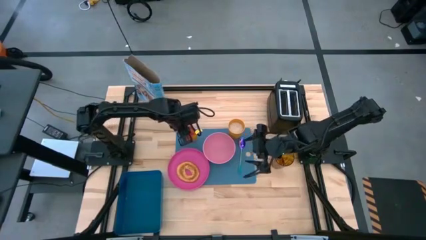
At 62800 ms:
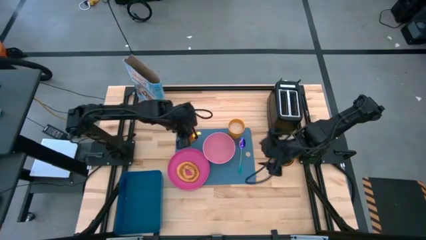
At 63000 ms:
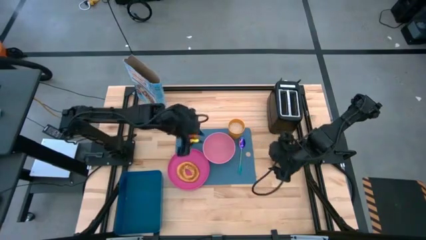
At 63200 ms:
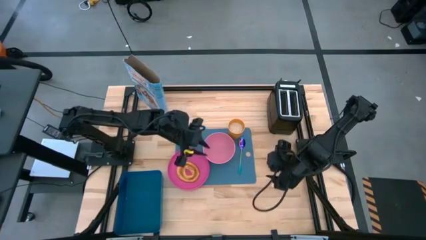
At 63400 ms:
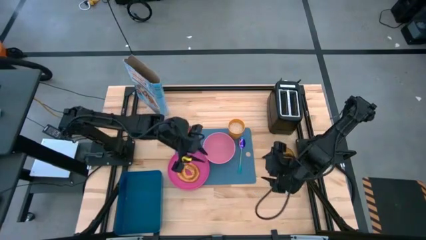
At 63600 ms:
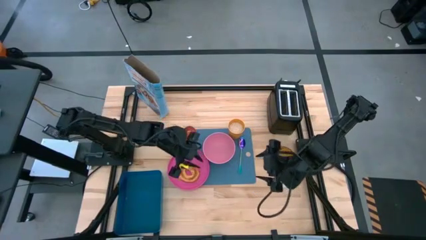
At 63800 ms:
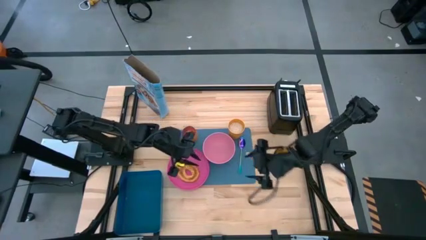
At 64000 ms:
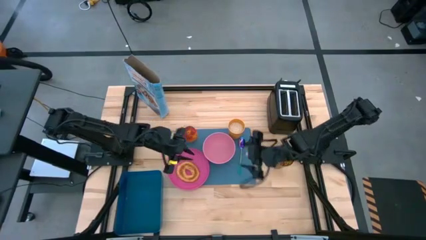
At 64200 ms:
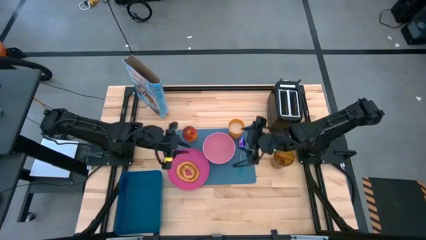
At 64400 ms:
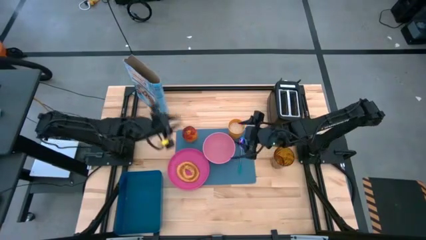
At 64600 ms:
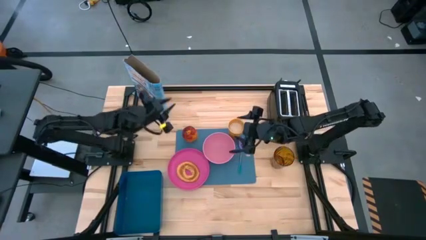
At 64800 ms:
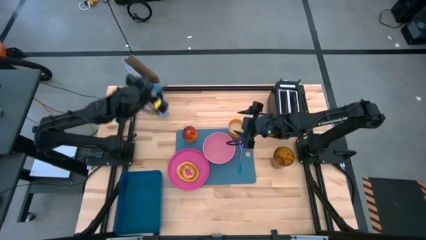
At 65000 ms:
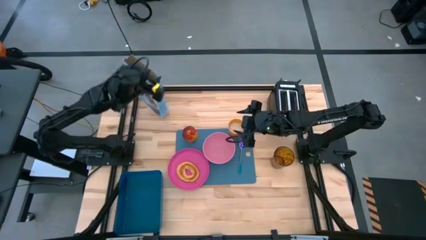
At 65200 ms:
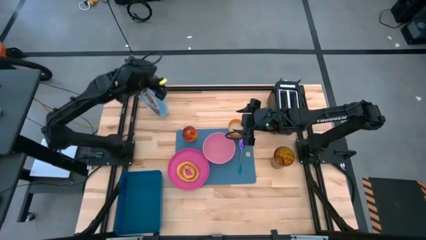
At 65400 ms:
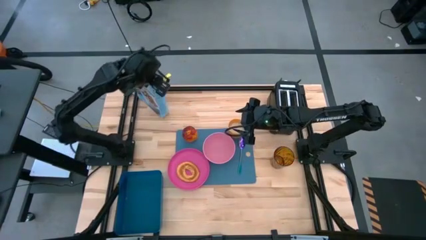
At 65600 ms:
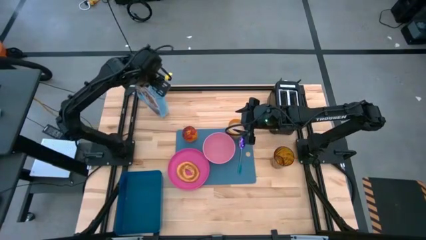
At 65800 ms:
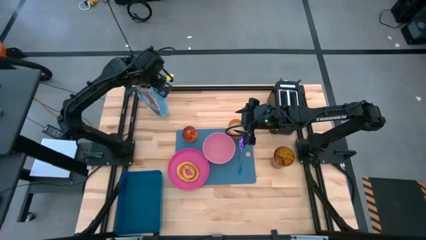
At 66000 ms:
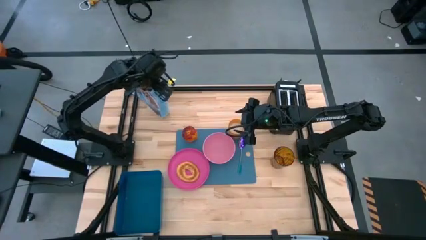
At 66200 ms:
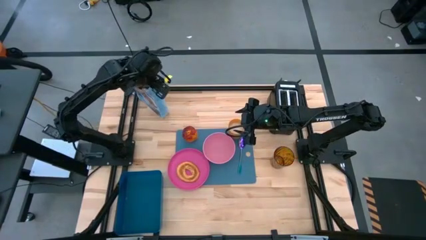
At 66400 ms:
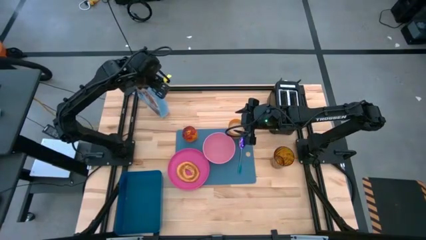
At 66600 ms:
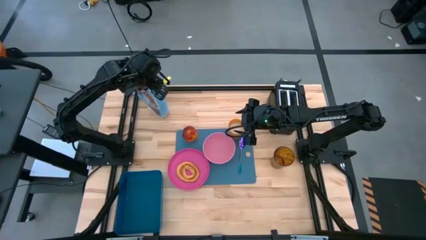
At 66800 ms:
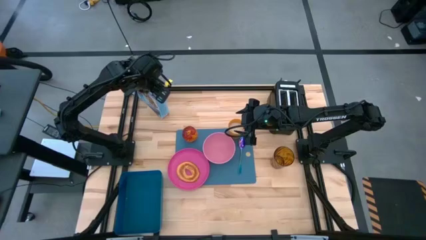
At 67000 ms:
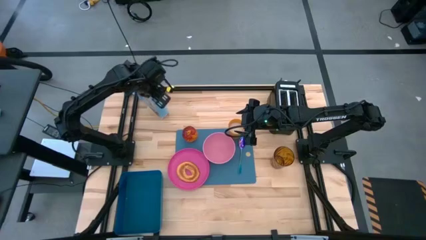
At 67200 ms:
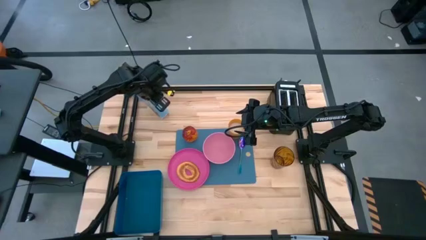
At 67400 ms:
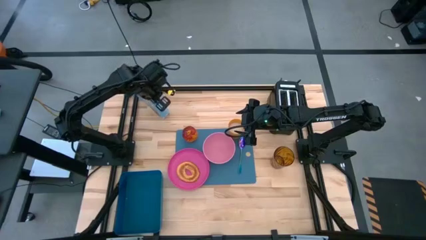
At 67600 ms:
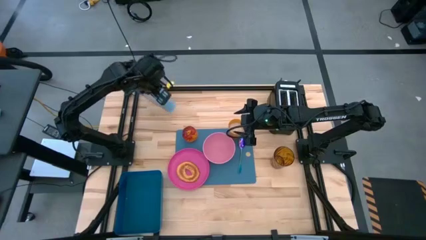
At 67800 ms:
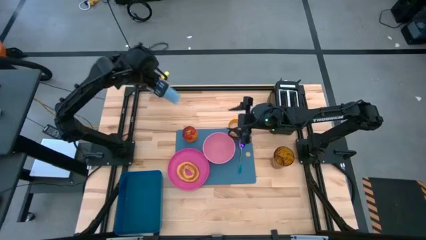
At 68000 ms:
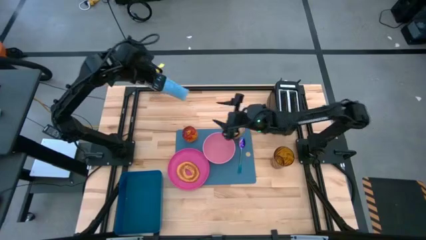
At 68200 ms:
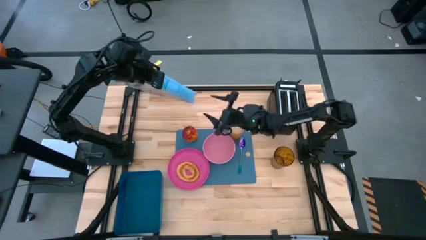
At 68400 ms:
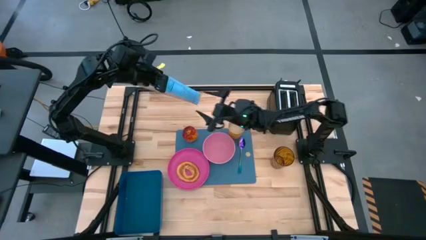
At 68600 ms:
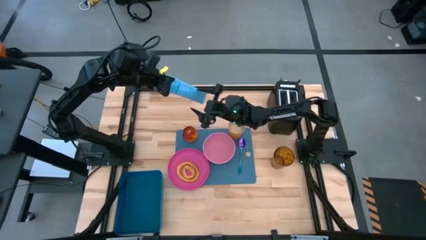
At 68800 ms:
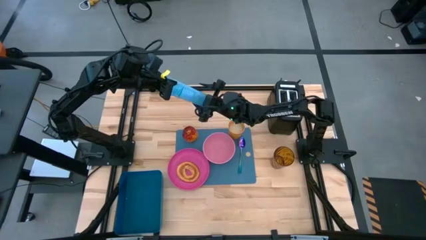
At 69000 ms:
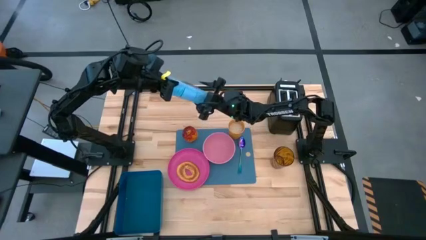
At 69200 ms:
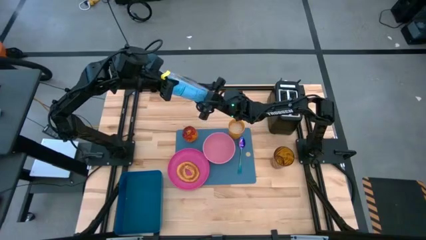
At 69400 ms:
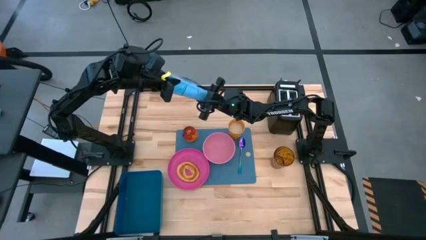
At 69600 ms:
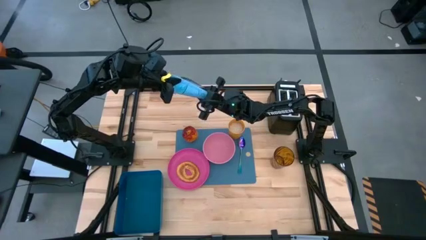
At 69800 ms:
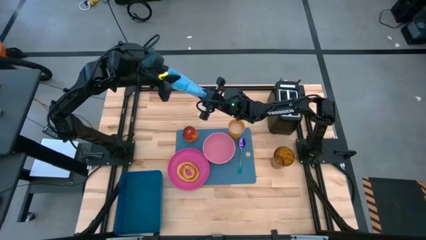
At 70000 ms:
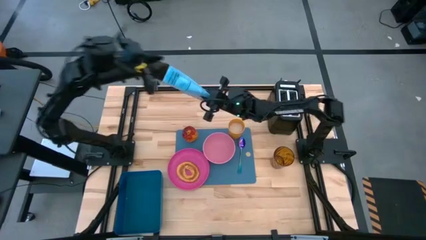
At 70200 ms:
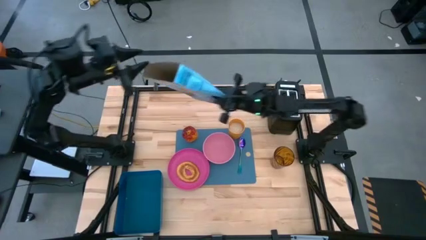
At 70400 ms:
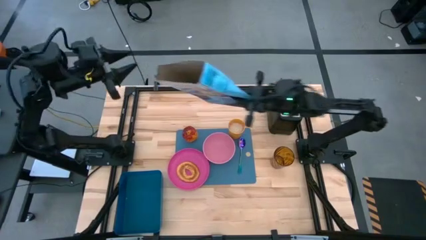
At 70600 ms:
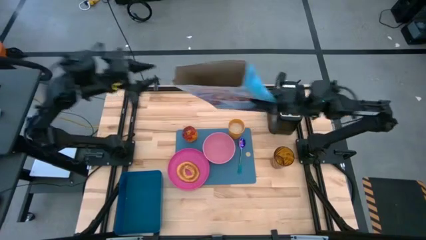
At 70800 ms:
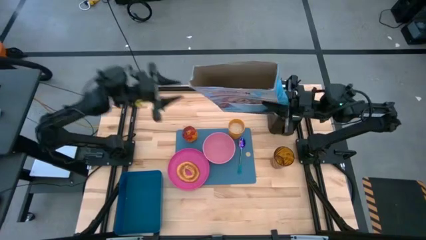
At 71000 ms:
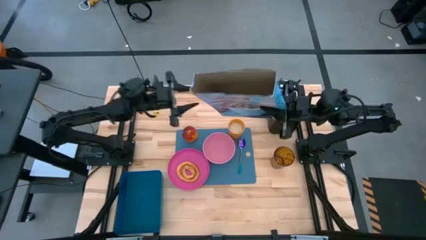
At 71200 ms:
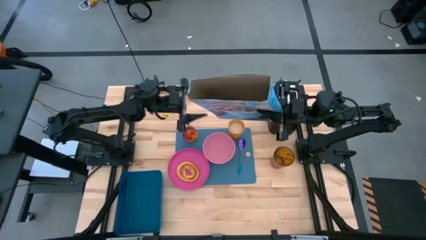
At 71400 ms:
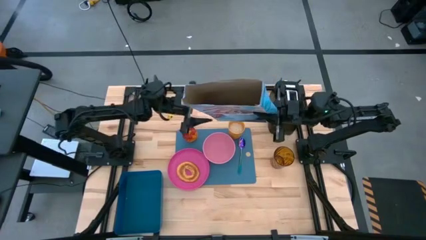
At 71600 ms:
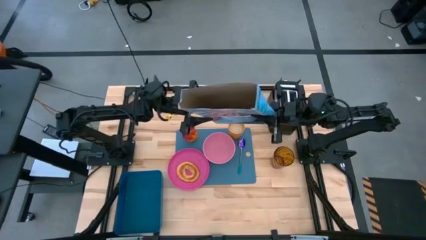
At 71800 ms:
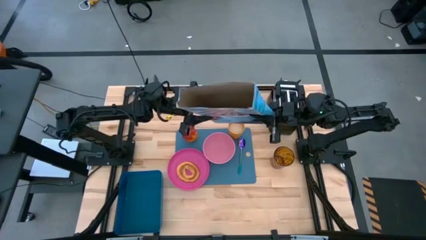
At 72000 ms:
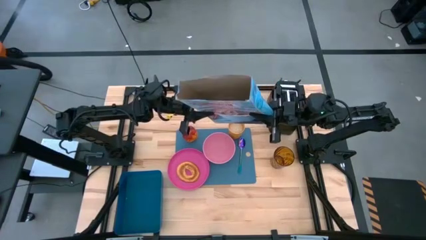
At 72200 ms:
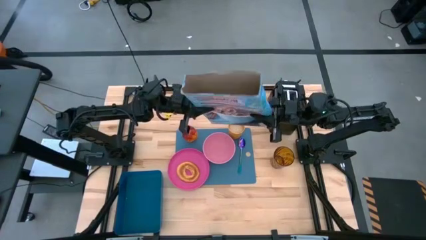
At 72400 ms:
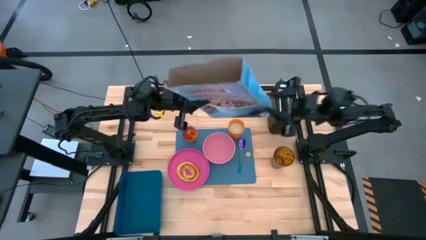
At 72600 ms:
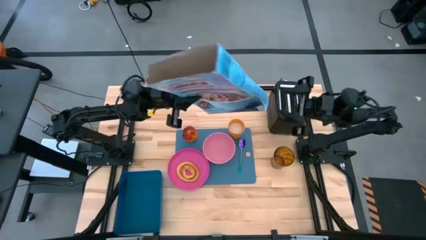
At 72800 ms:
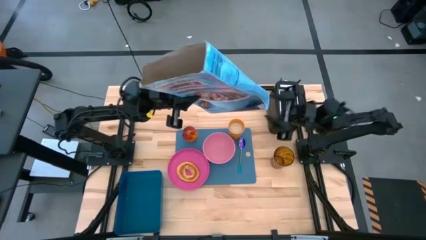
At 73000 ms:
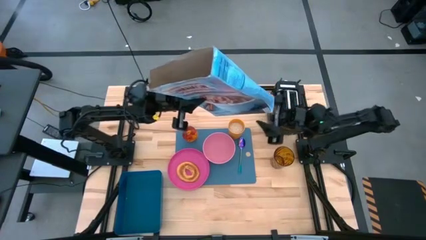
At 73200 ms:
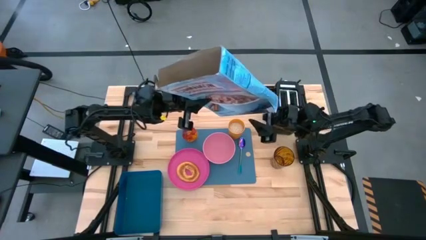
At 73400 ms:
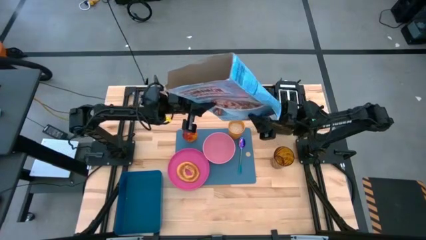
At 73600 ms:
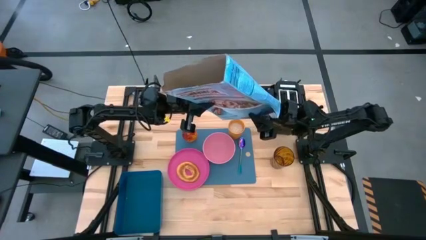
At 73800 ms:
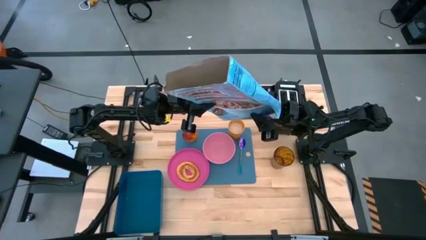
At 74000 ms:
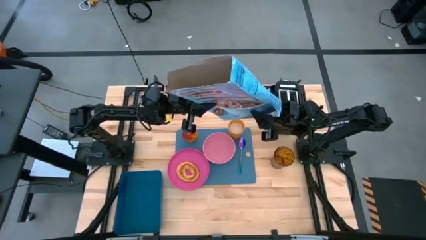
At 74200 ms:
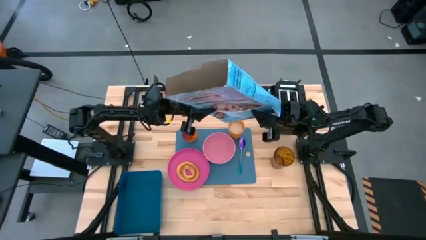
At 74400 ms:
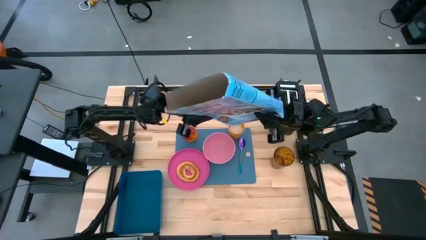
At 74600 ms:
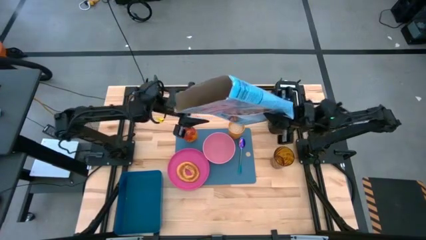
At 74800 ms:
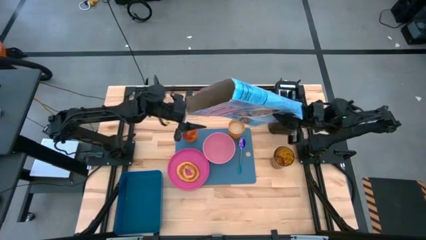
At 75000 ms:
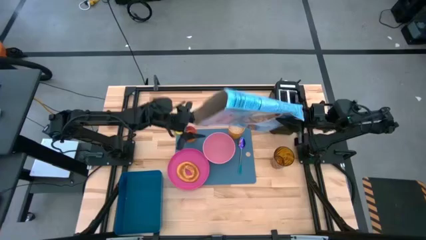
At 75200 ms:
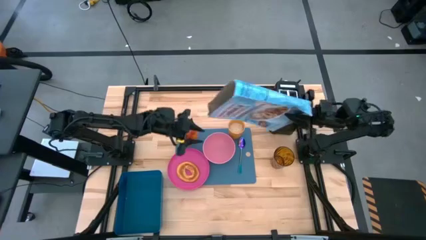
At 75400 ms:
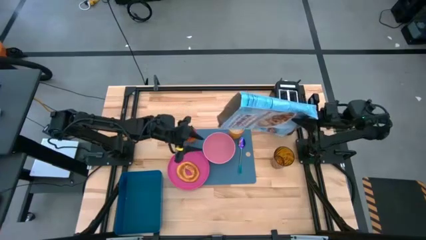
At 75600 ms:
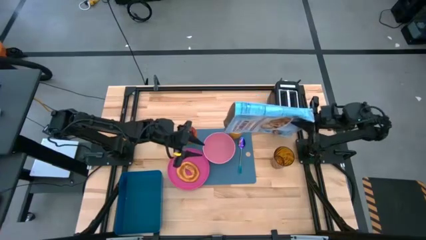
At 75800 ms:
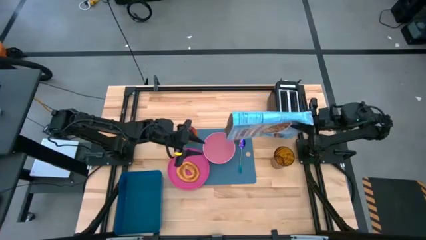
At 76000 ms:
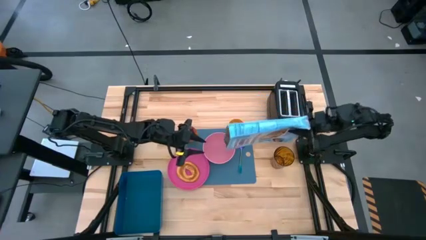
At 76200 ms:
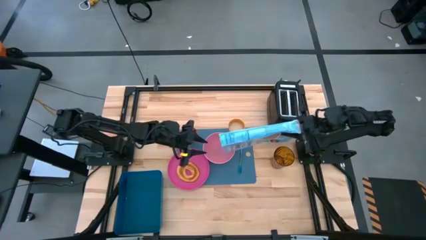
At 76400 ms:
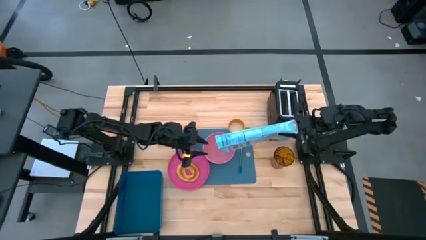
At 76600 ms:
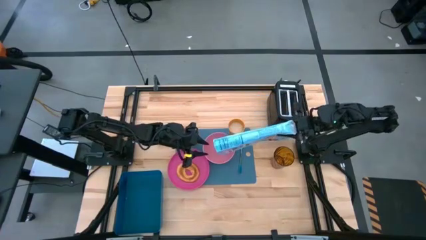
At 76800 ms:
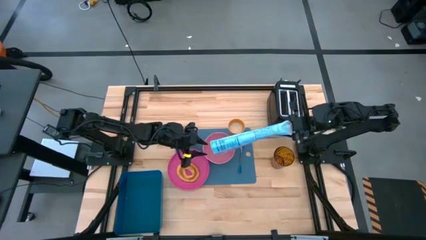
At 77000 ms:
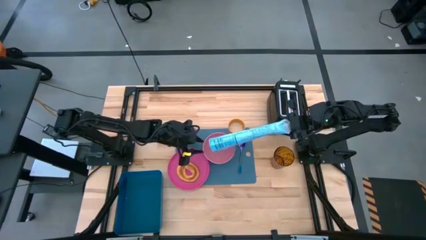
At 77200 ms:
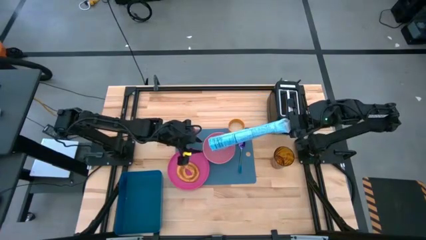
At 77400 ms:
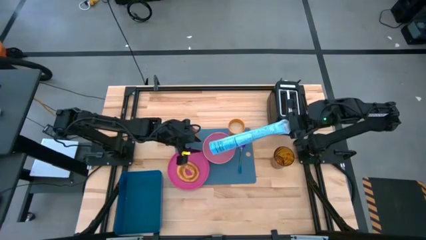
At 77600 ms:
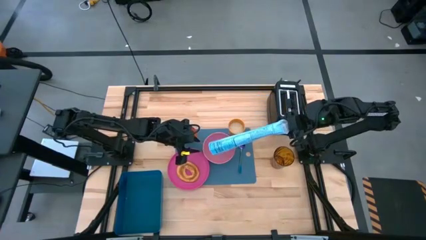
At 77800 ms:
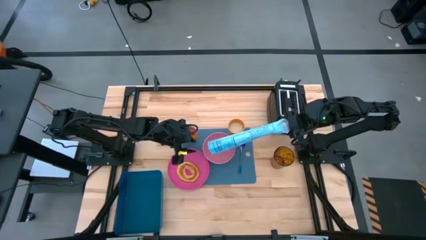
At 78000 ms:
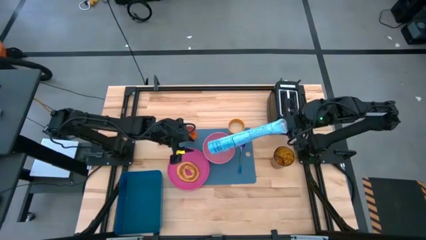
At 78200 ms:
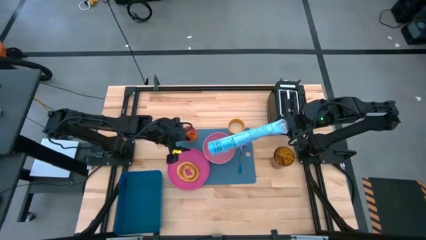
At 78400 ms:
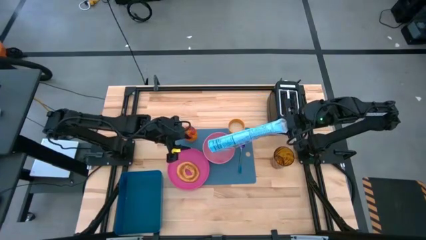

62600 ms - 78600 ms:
Task: Arrange a breakfast setting
Pour the cereal from the blue cereal box into the pink bowl
